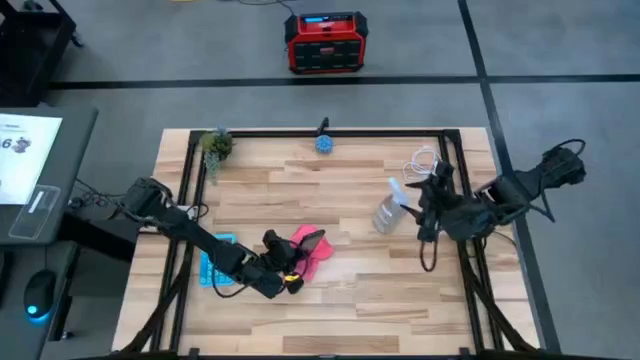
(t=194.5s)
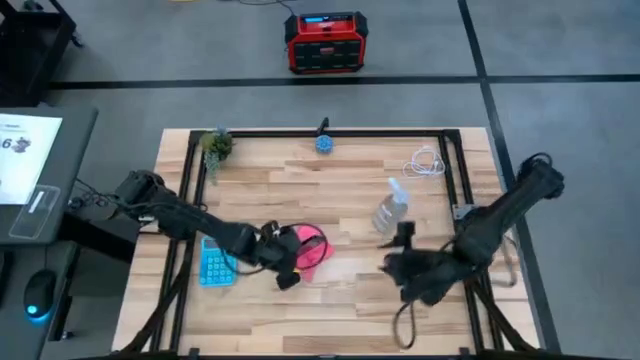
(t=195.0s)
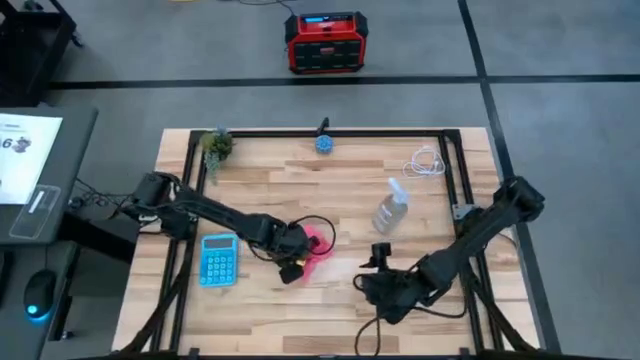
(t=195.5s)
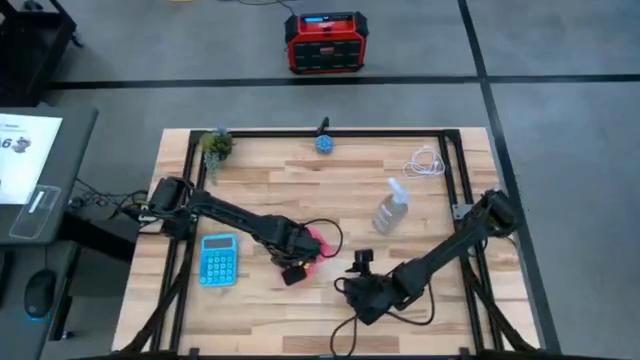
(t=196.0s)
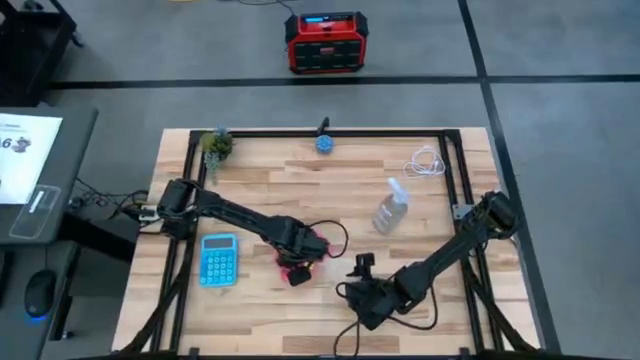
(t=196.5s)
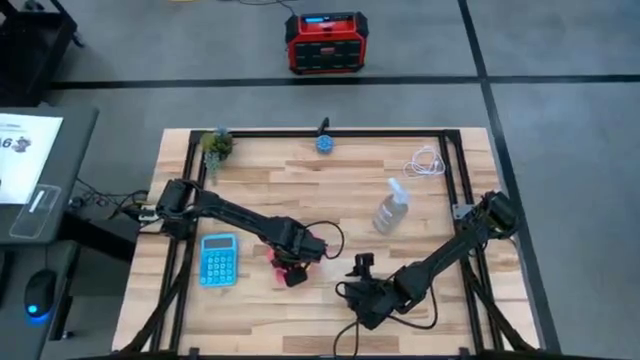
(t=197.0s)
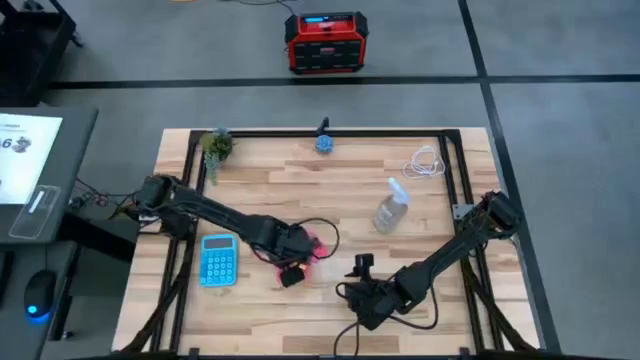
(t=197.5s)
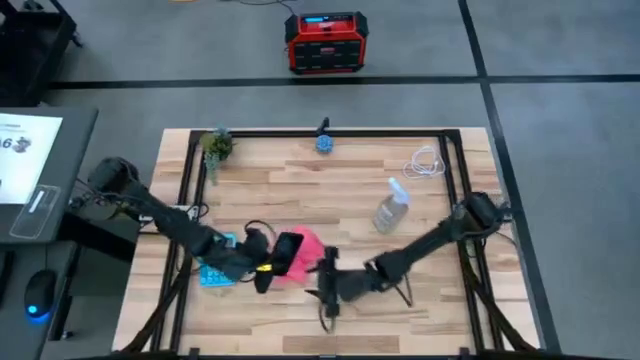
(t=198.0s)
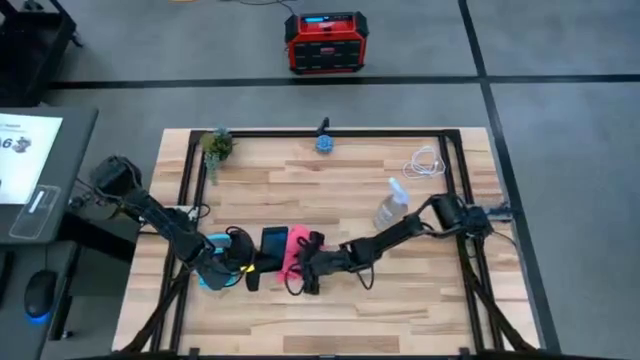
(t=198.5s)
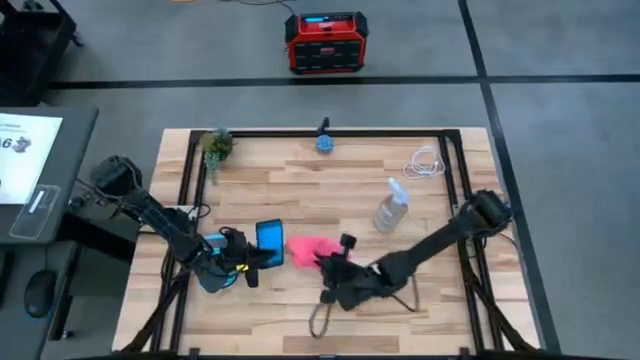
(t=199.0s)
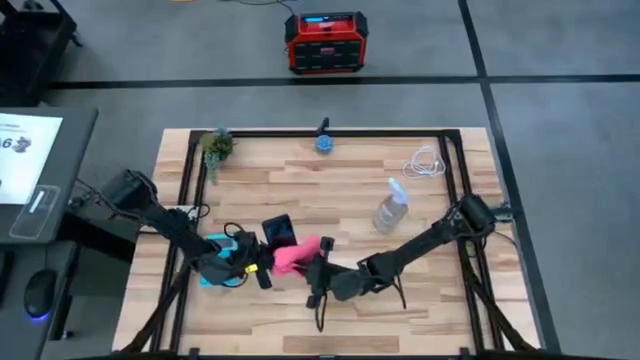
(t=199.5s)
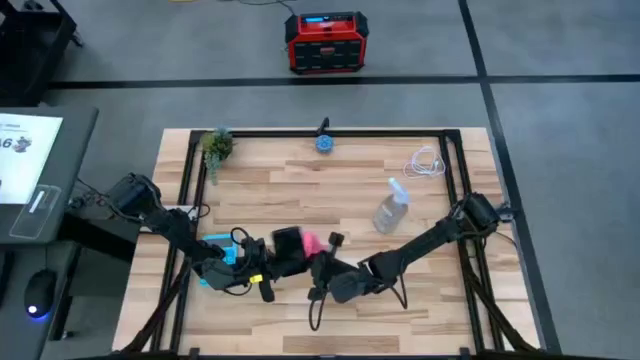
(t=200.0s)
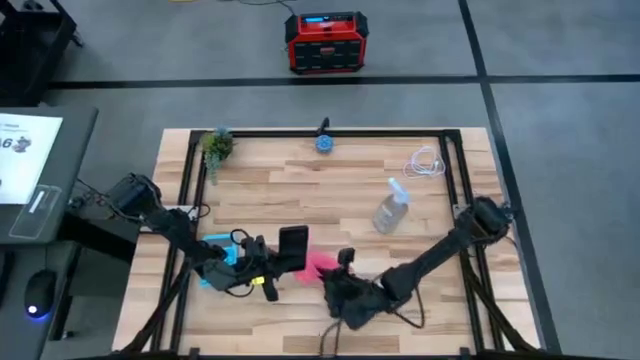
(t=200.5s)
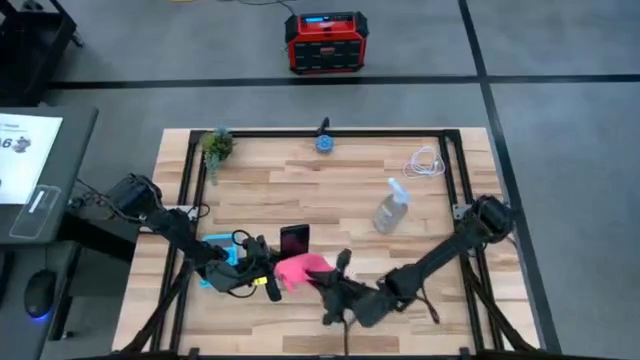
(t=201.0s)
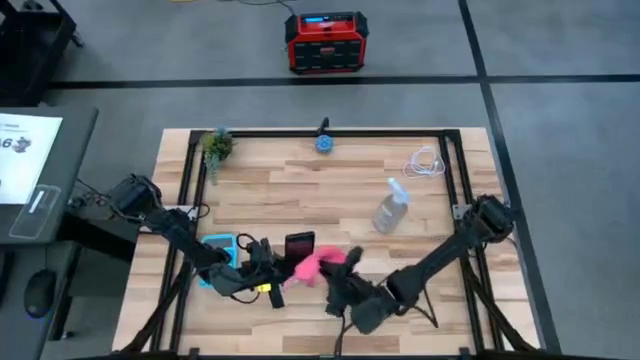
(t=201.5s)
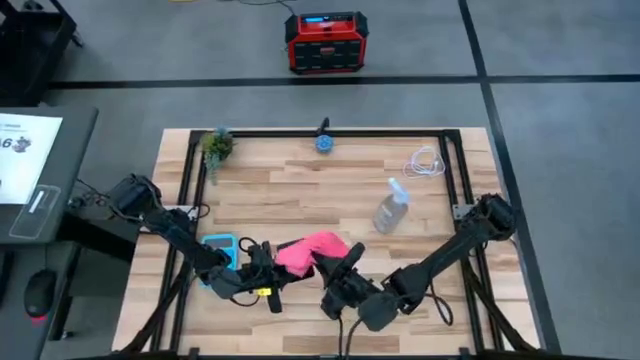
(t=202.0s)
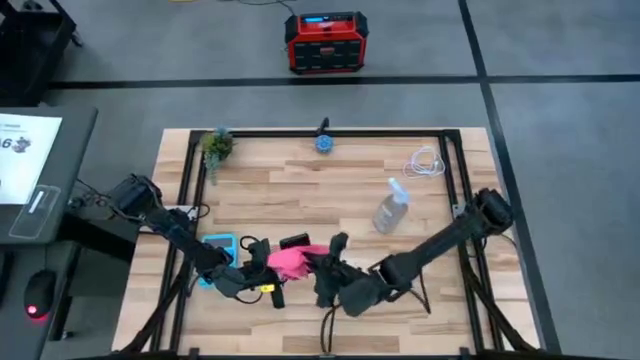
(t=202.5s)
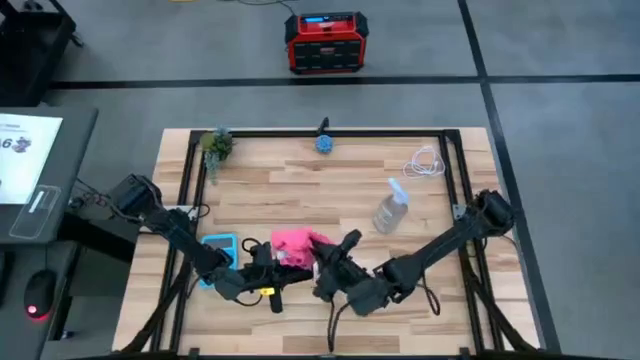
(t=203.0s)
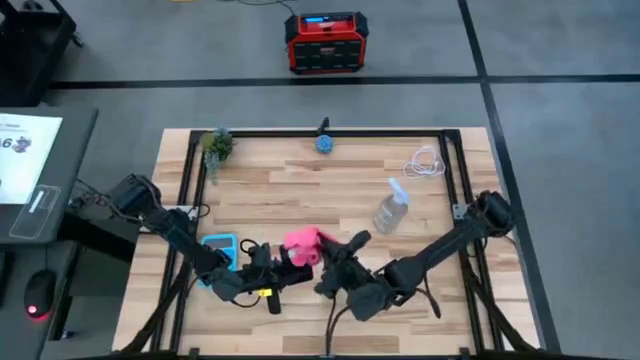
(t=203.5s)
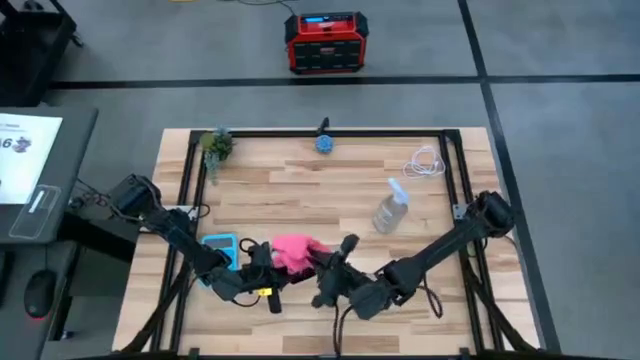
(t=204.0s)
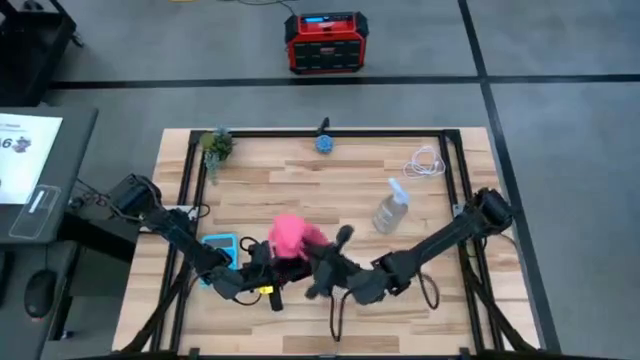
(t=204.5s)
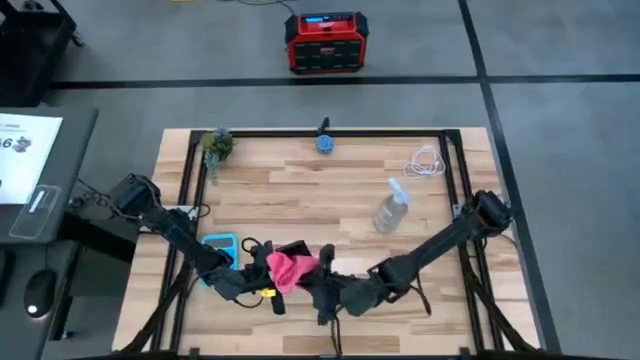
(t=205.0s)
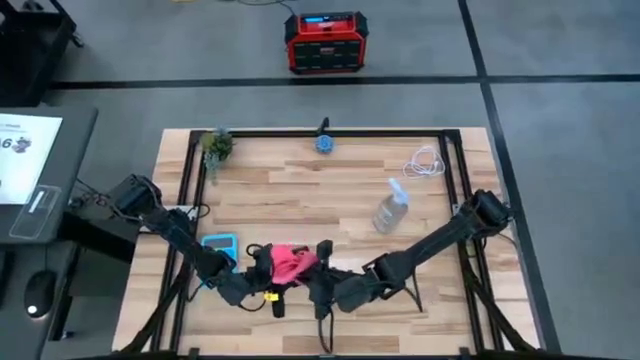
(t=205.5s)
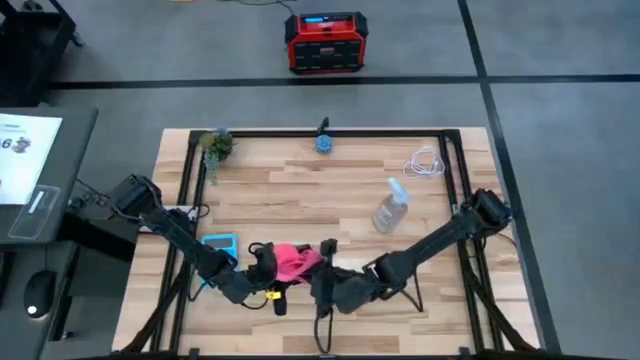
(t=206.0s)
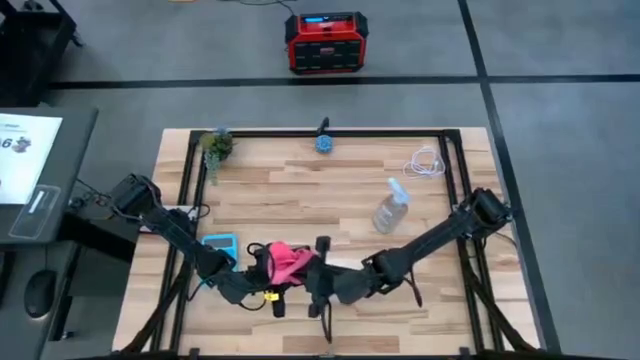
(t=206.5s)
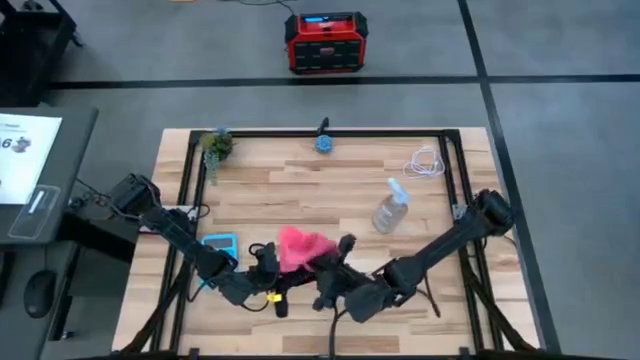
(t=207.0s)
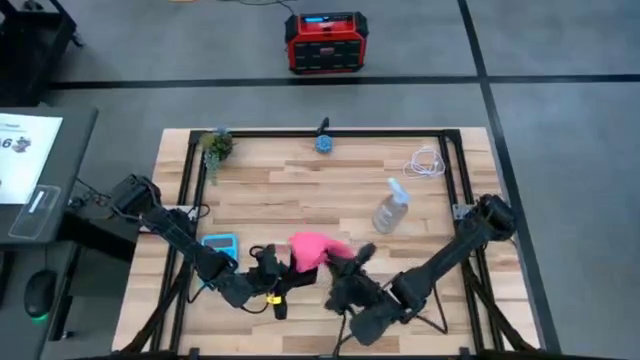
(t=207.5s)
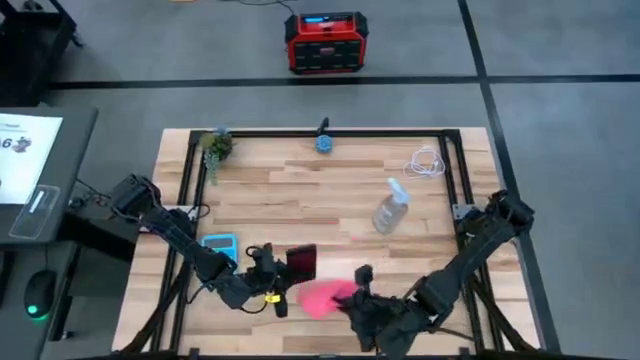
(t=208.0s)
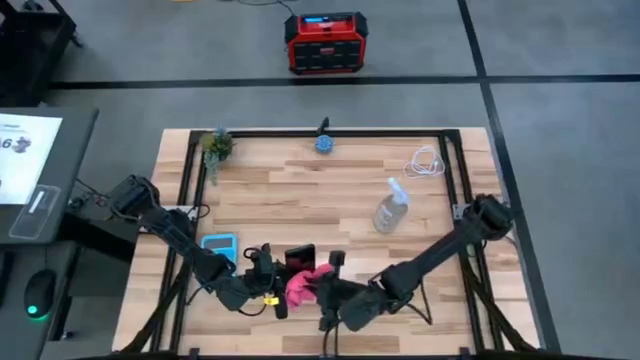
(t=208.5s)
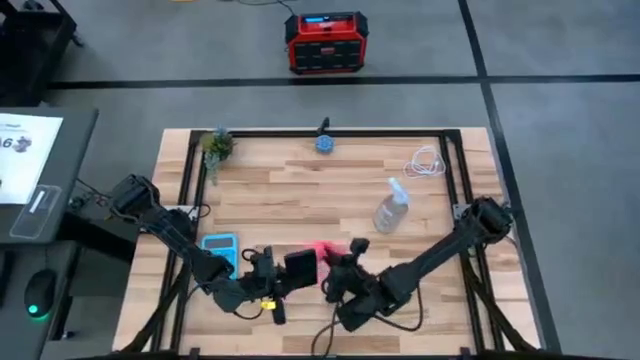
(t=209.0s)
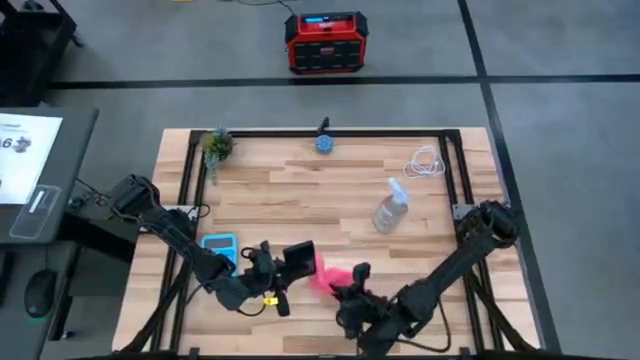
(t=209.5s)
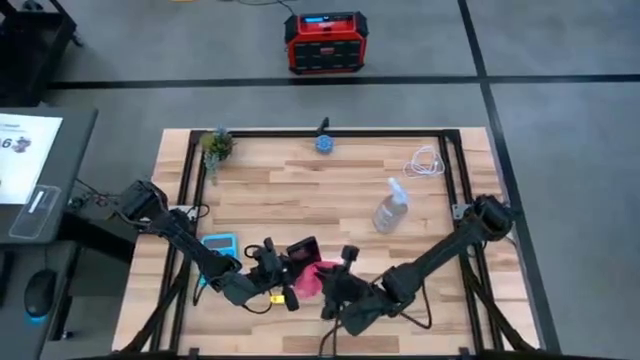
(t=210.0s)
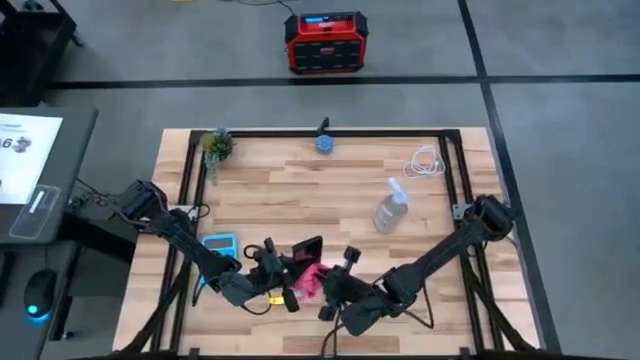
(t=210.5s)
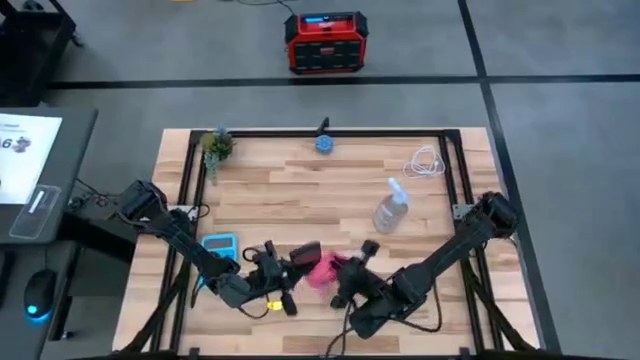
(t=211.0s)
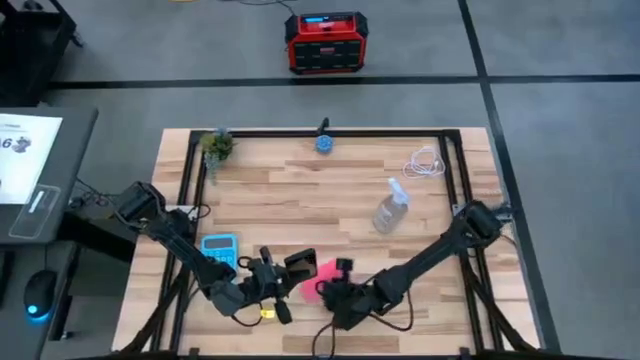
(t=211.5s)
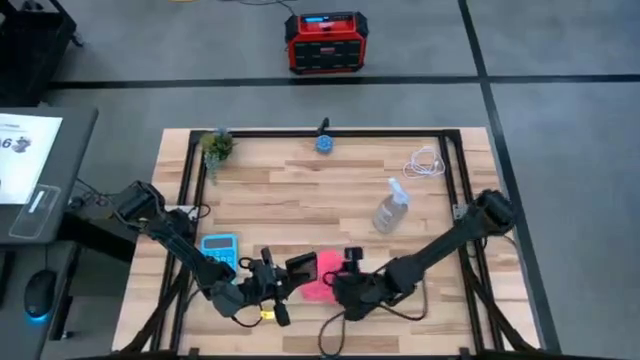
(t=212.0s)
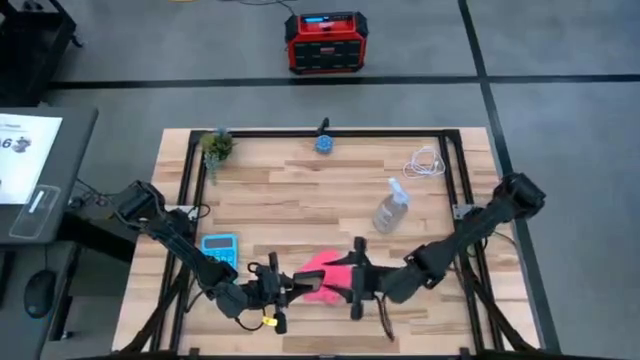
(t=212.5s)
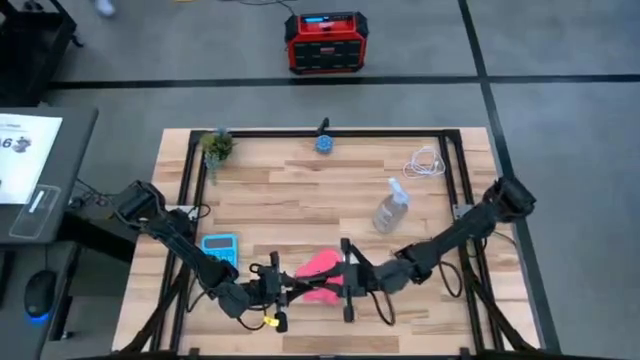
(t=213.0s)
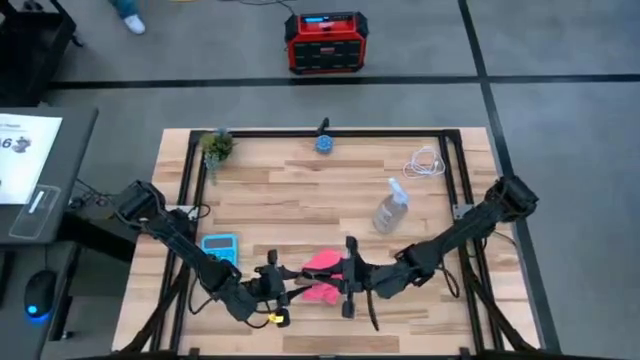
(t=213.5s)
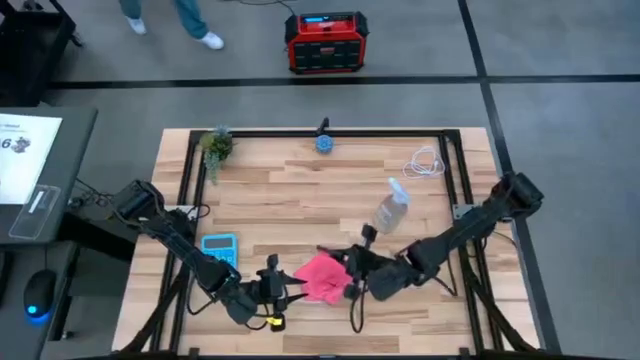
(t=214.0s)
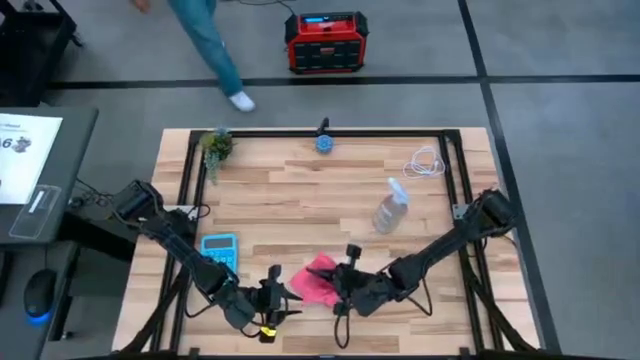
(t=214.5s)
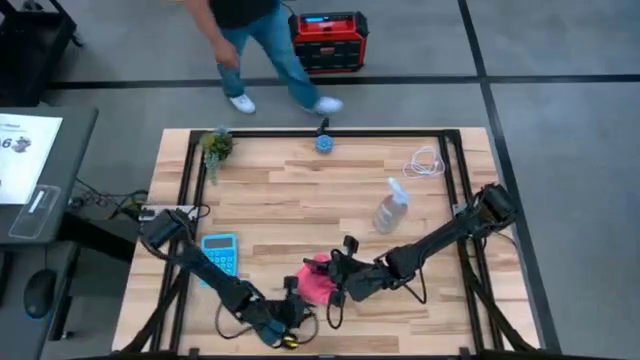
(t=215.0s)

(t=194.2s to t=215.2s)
Task: Apply microfiber cloth
Wipe the front of the black cellphone using pink microfiber cloth

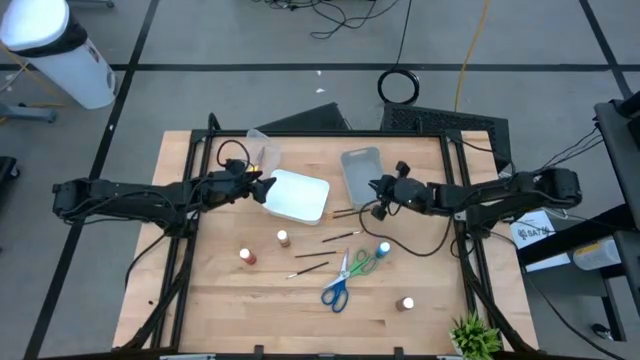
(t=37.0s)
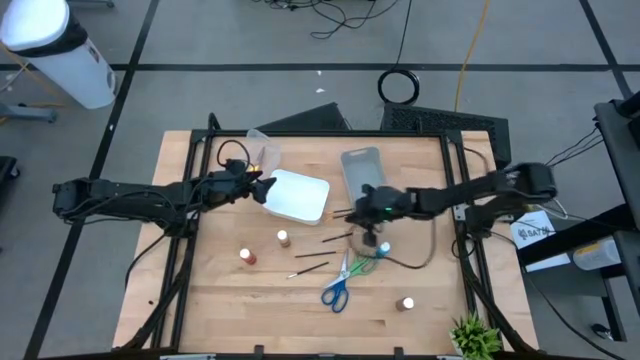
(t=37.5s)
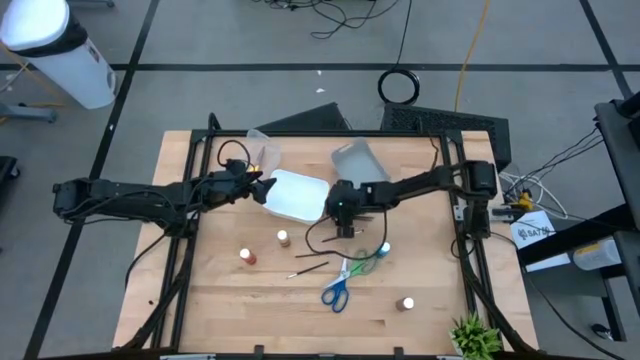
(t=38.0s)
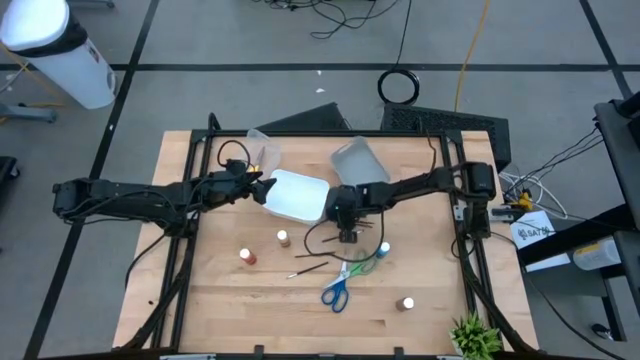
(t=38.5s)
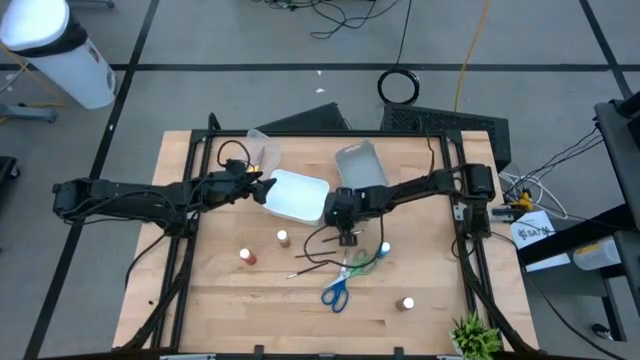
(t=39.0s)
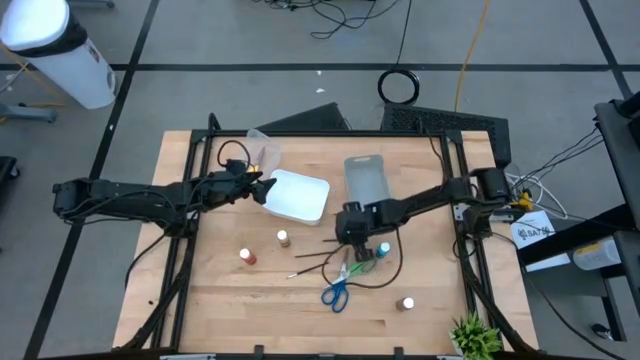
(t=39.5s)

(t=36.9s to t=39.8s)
Task: Pick & Place Paint Supplies
Put the middle gold and black paintbrush into the gray bin
